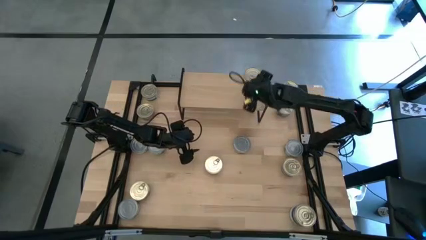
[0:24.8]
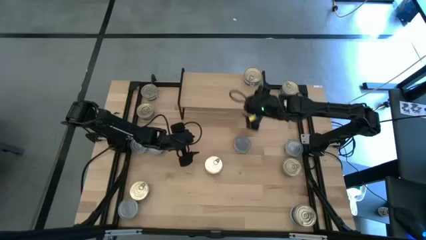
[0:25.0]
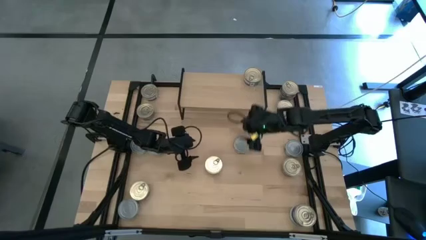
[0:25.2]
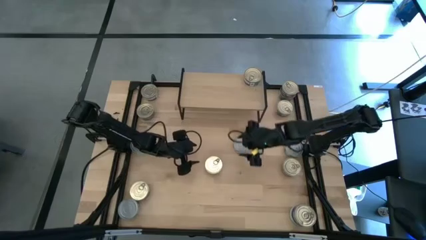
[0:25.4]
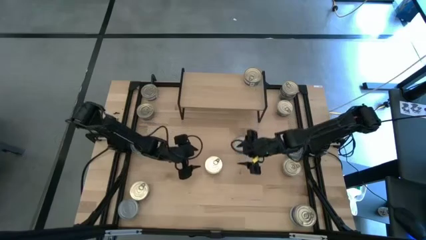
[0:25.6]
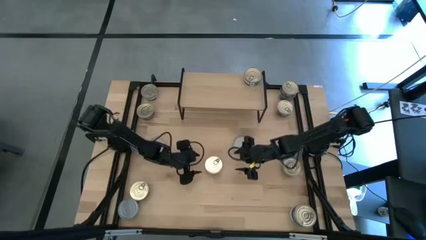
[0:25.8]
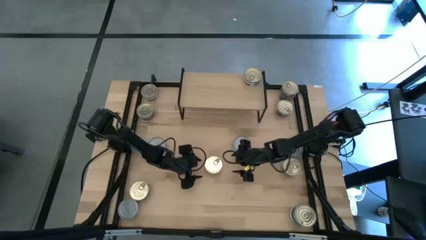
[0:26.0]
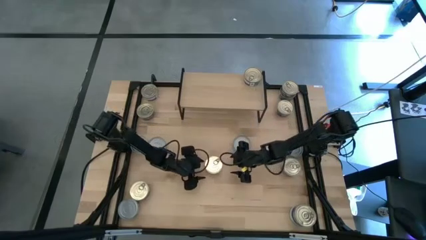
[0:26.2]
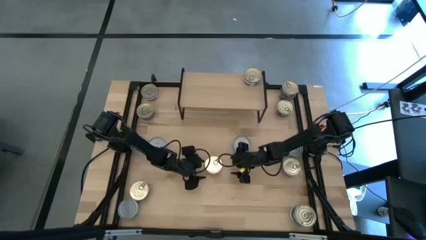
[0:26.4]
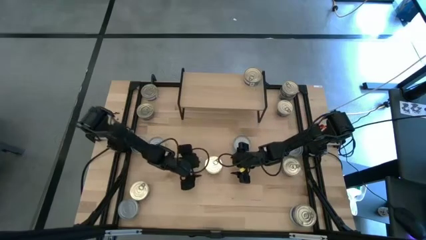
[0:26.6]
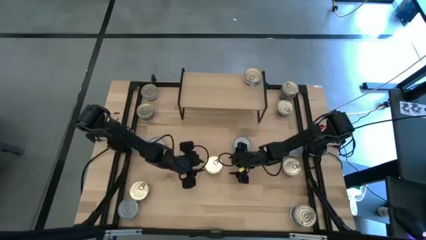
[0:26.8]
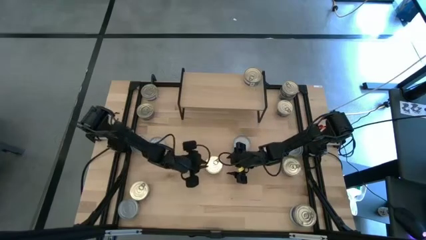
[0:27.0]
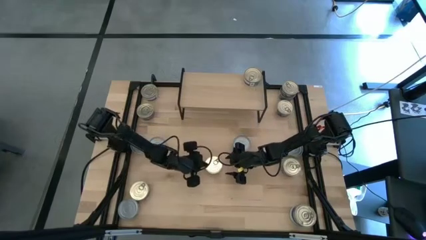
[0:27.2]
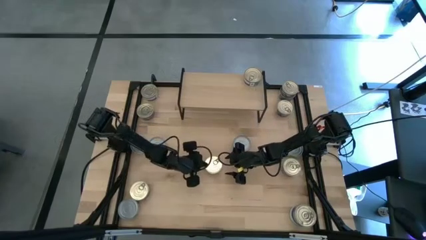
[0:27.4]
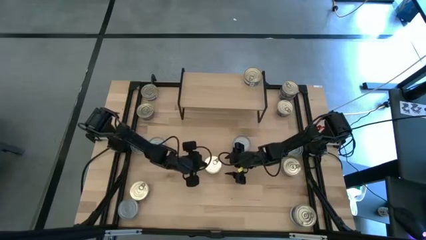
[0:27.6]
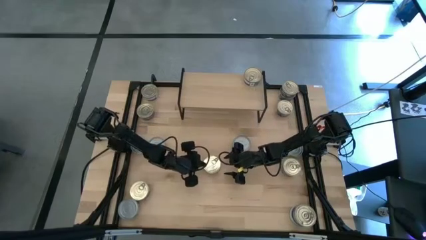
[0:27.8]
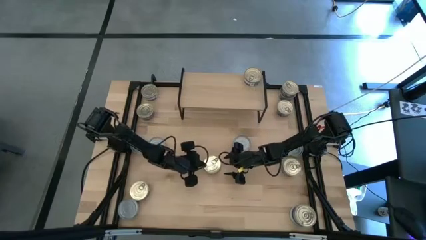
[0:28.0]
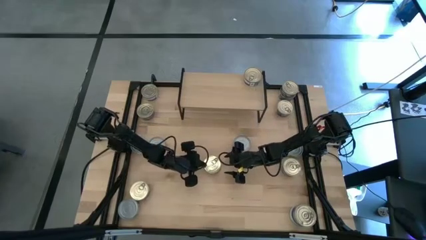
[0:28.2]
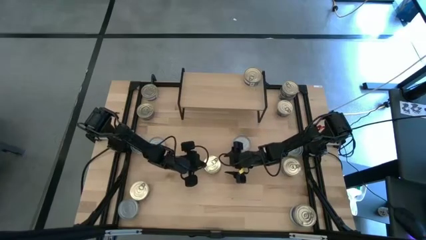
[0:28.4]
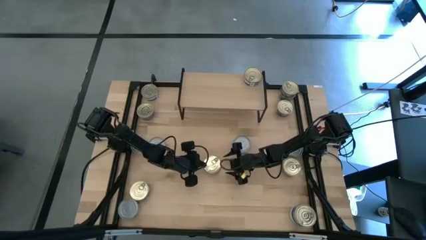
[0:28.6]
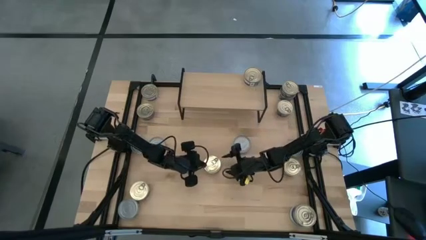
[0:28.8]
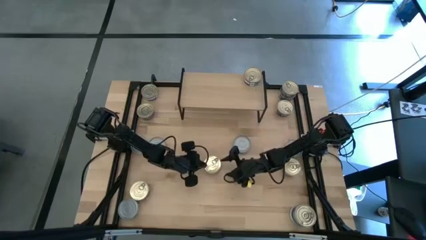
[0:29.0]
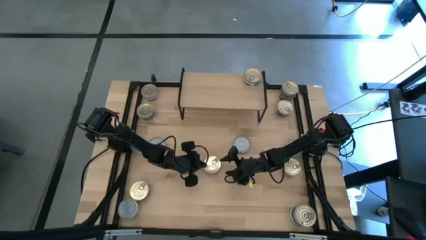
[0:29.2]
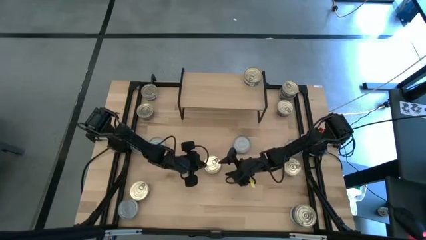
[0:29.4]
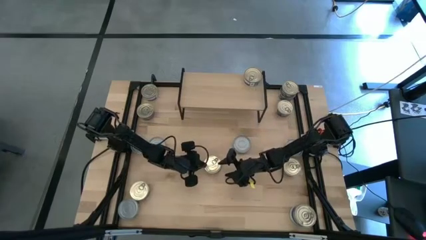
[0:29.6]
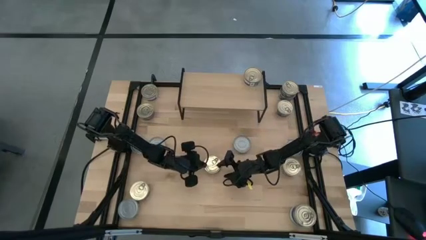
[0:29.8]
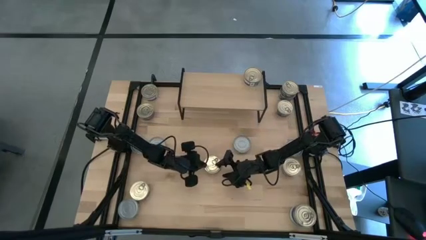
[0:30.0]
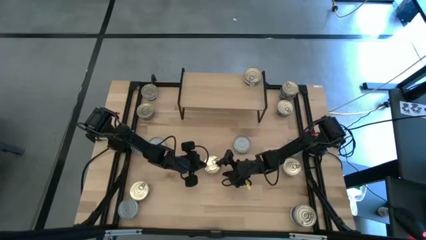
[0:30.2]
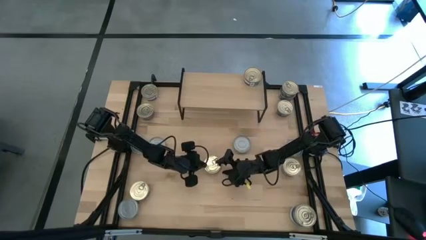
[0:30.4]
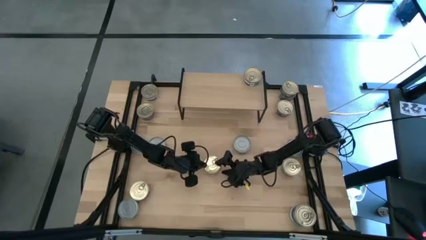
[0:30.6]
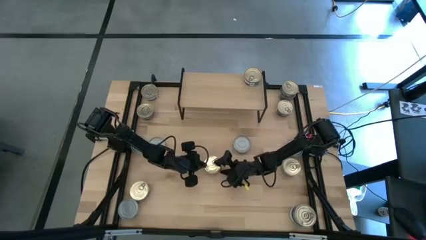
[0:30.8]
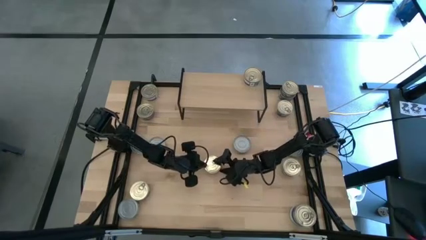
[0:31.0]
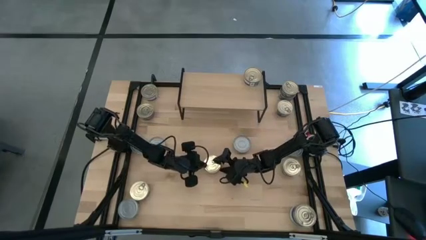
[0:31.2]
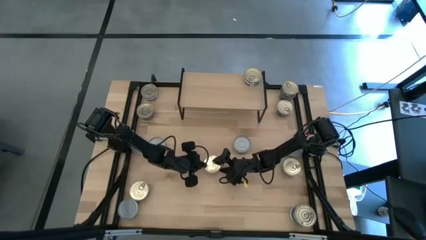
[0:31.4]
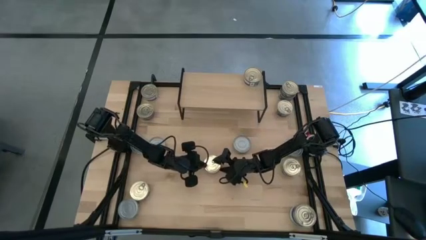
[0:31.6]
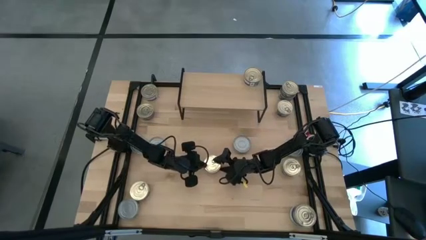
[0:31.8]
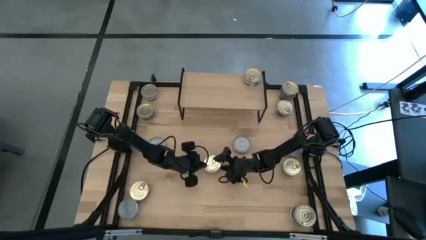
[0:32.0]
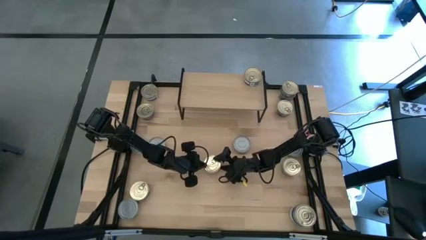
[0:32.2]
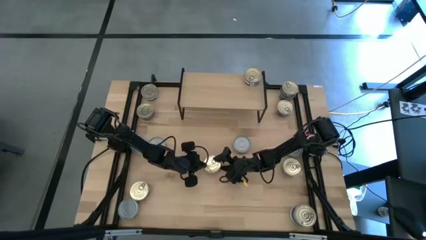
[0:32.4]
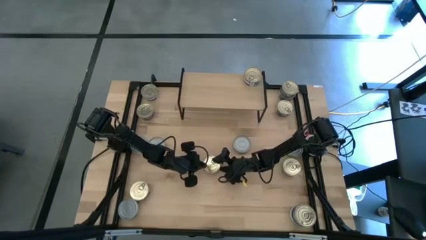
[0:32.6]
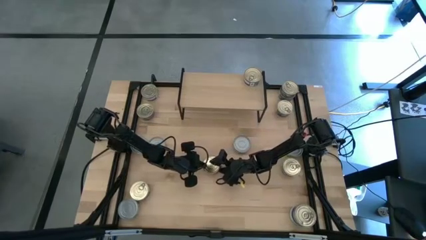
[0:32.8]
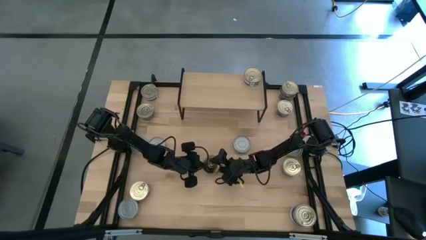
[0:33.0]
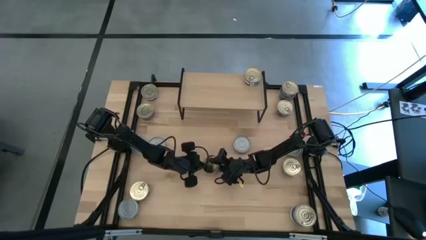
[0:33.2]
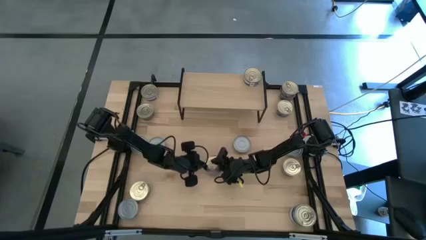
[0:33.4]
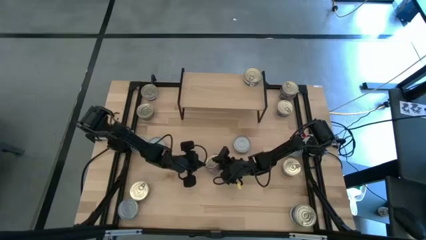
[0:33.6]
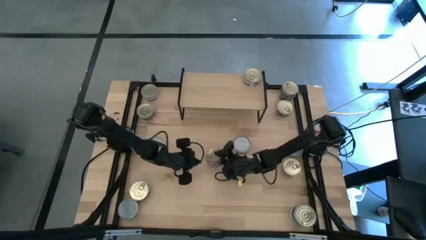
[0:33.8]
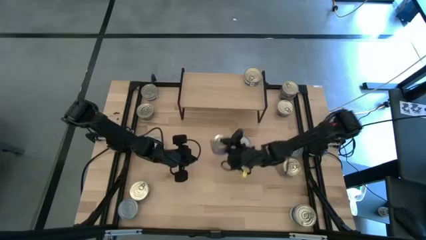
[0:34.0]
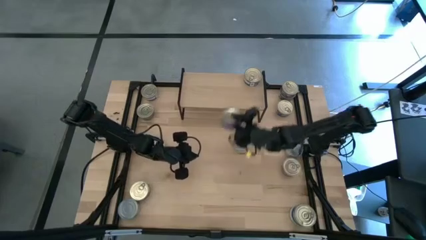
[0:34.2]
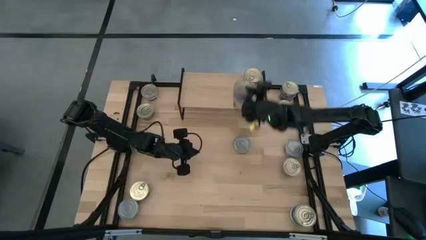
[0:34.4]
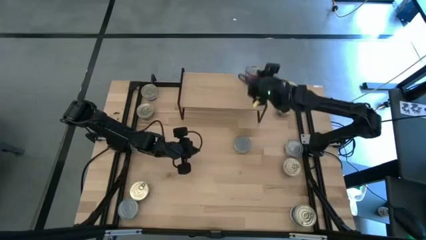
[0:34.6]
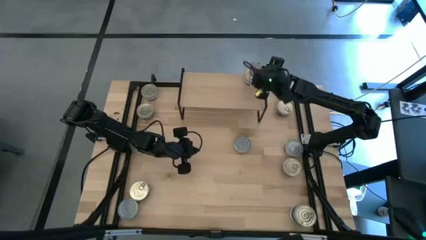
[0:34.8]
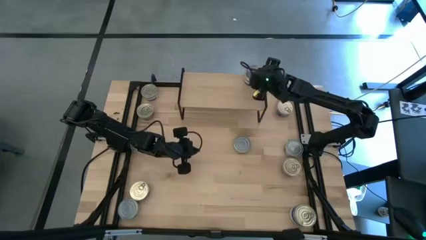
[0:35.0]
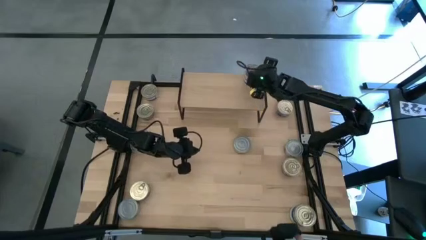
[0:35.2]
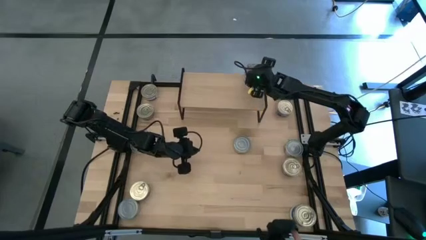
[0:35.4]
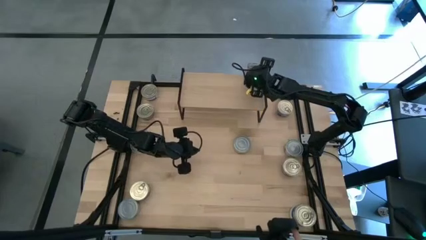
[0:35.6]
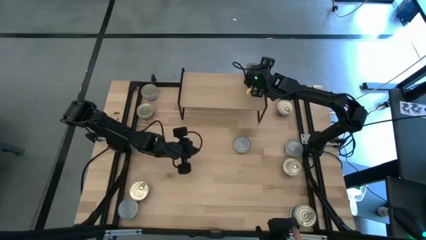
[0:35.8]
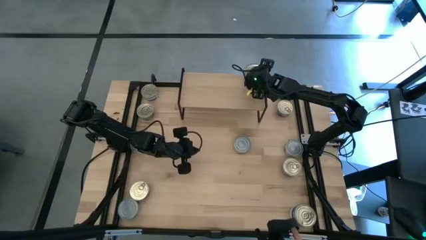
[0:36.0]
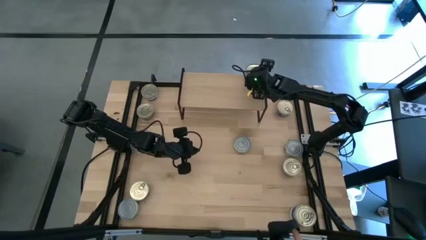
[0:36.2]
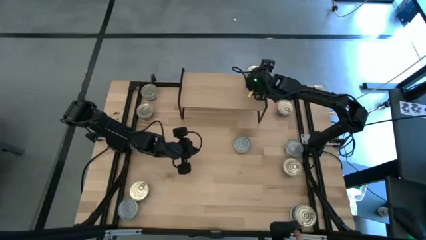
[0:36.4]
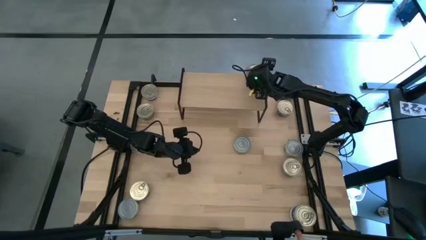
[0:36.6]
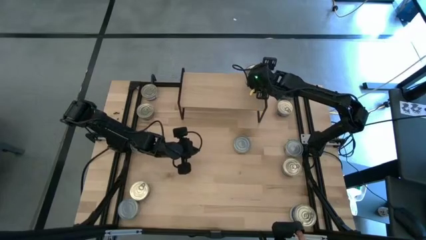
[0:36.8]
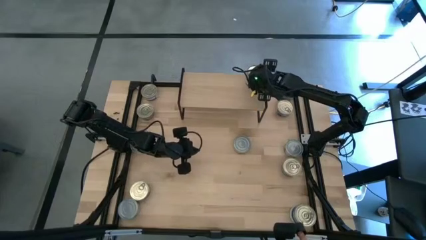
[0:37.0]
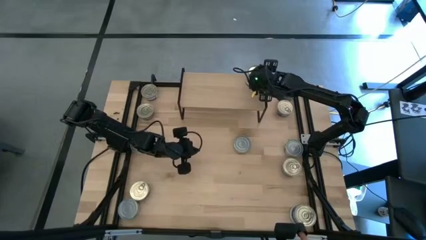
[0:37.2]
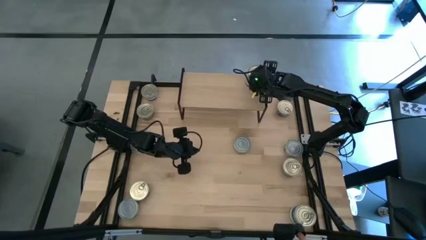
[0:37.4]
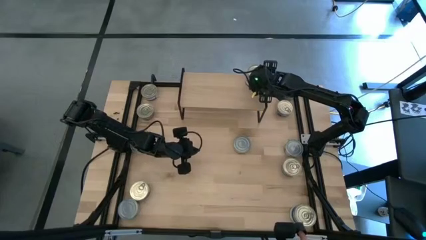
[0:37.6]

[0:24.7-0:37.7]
Task: Stack canned seafood by type on shelf
Stack the blue pink tuna can on top of the blue pink tuna can on the shelf

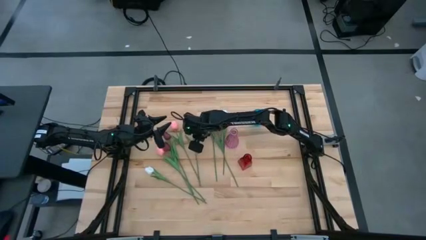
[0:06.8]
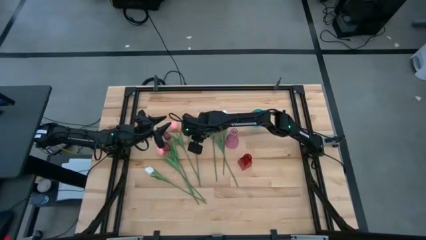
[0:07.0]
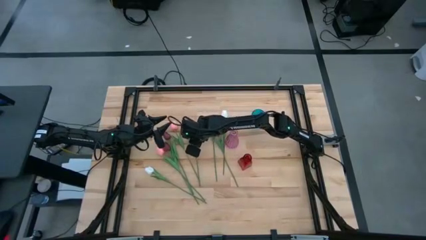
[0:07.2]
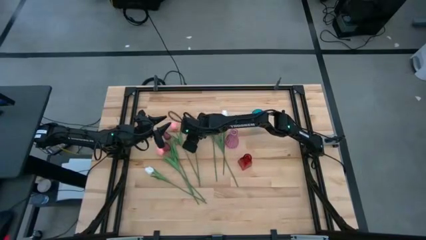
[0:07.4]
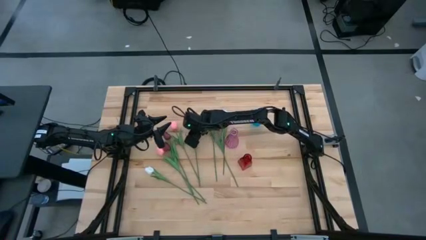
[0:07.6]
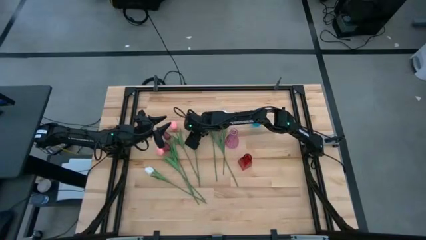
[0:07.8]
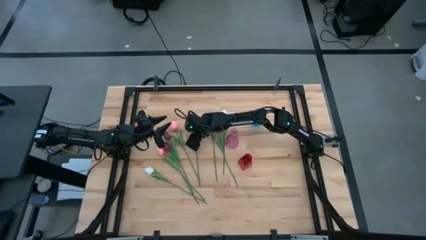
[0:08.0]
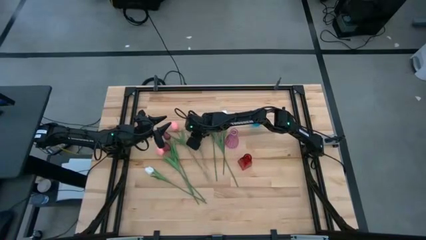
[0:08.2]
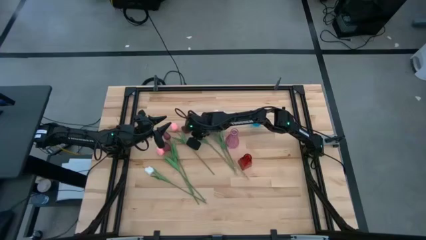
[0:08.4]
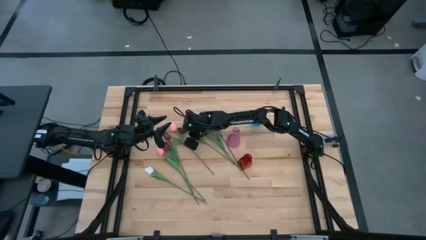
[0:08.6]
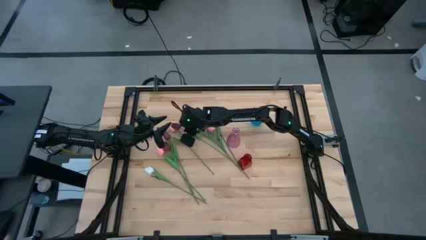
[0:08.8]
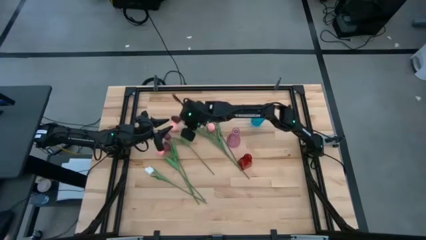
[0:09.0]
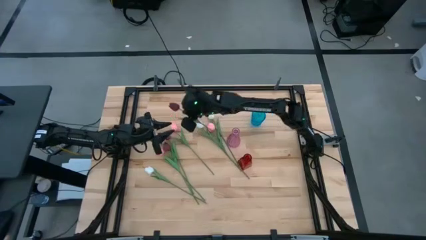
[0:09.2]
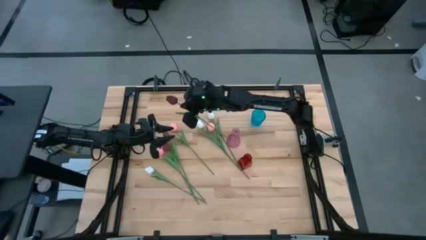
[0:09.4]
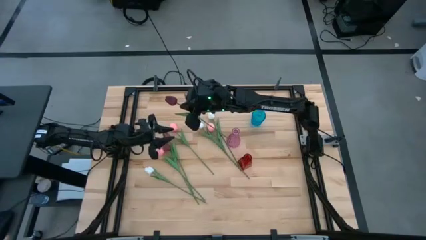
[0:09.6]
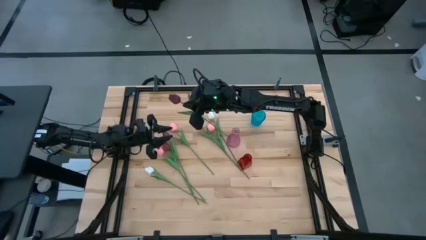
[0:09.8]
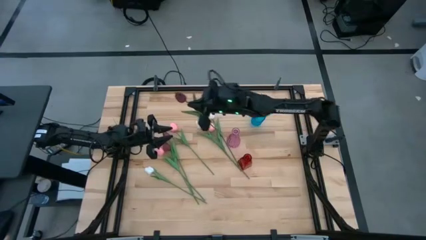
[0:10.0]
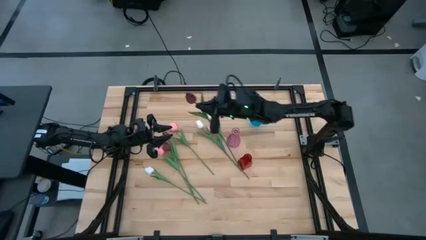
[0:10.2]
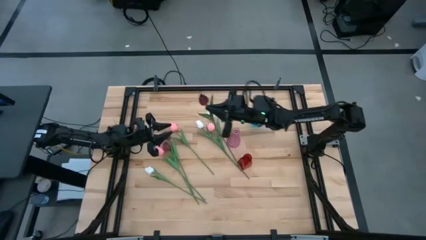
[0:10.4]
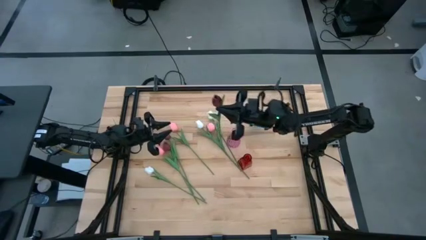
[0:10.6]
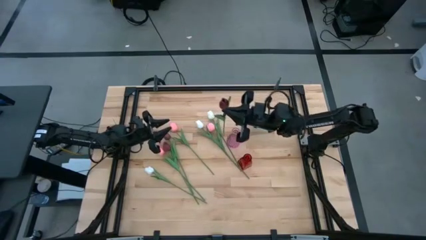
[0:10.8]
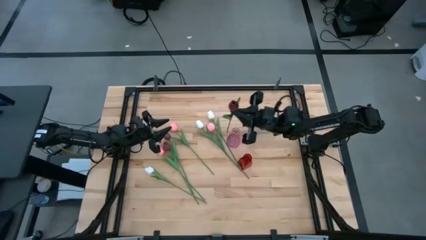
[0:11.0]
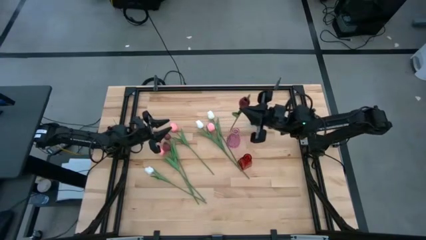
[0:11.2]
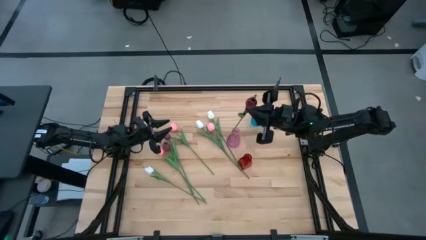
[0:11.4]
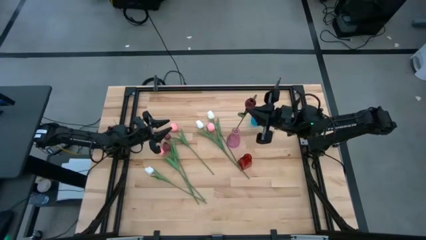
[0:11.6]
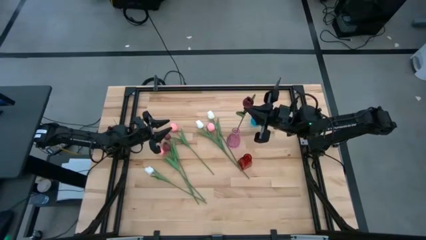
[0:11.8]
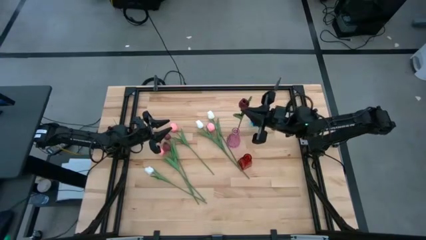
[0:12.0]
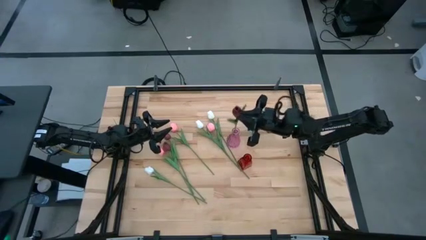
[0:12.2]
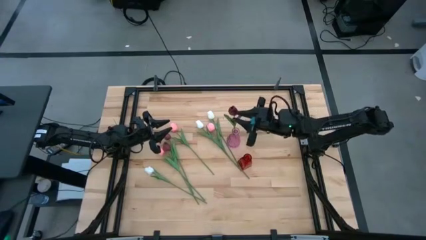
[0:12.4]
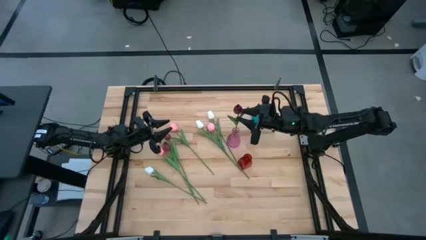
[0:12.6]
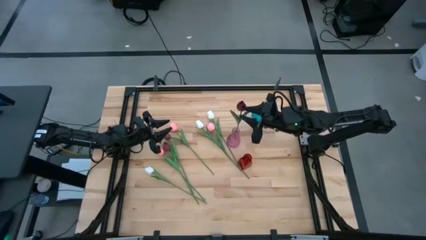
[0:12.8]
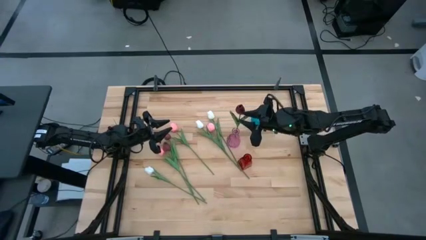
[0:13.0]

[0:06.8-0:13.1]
Task: Sort flowers into vase by color
Put the right red flower into the pink vase
